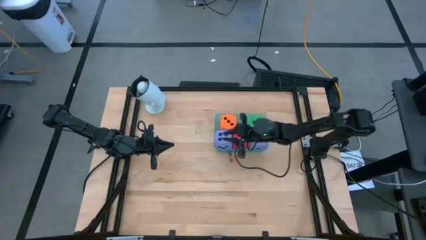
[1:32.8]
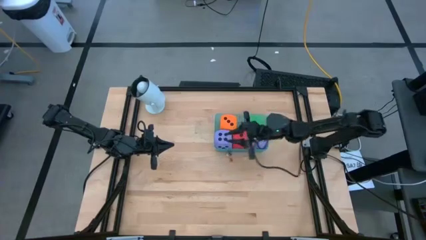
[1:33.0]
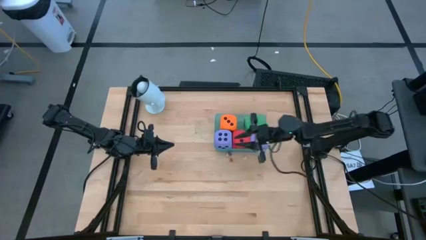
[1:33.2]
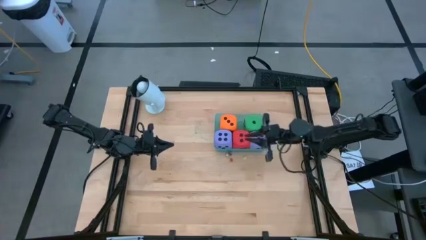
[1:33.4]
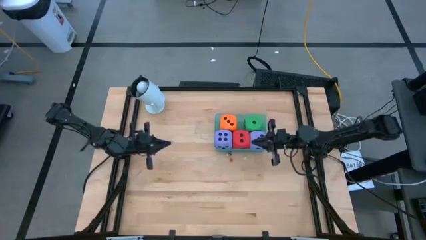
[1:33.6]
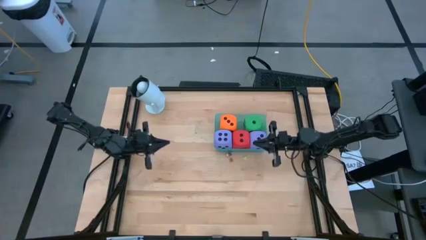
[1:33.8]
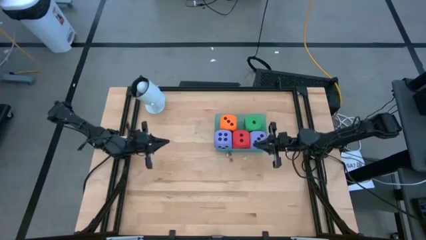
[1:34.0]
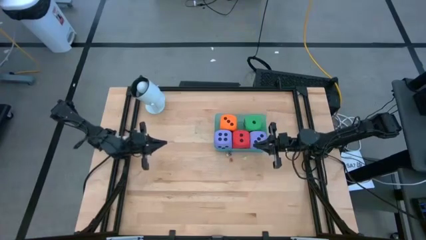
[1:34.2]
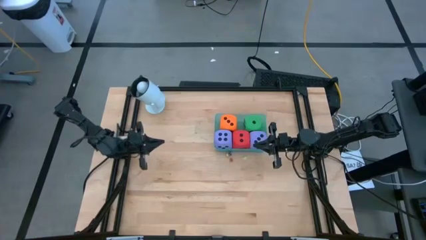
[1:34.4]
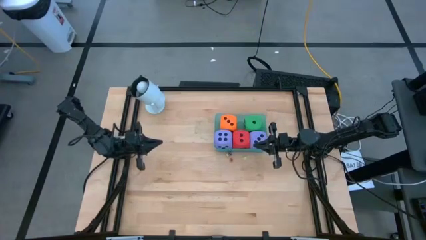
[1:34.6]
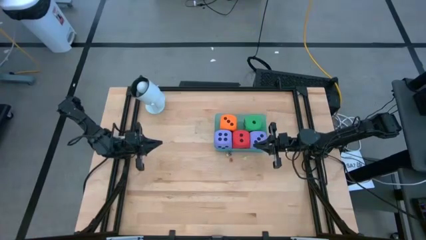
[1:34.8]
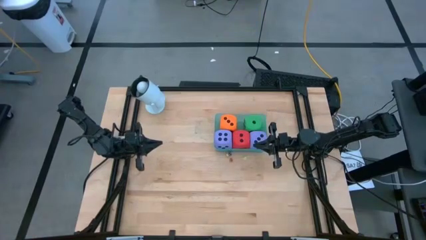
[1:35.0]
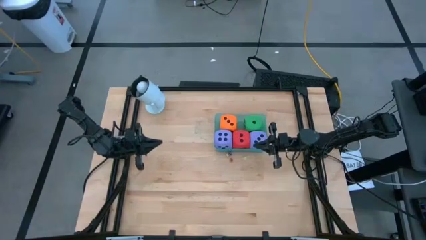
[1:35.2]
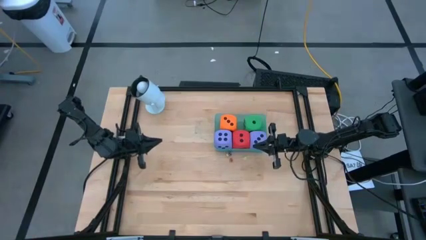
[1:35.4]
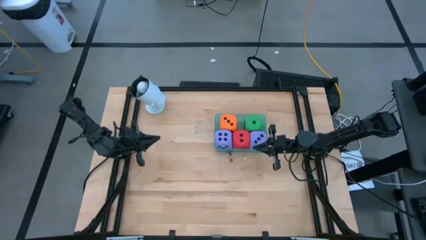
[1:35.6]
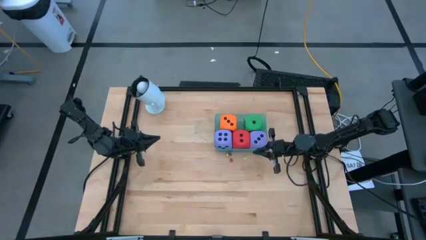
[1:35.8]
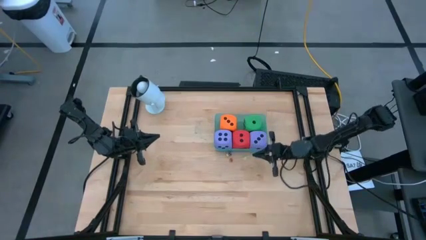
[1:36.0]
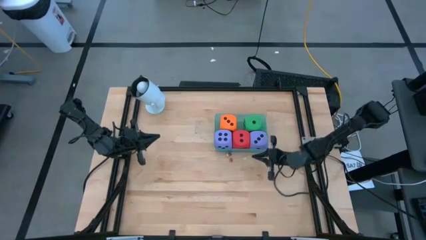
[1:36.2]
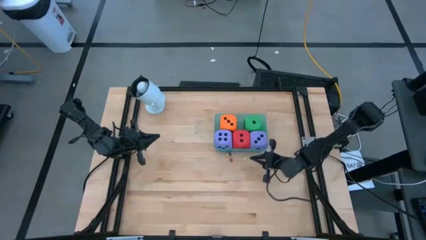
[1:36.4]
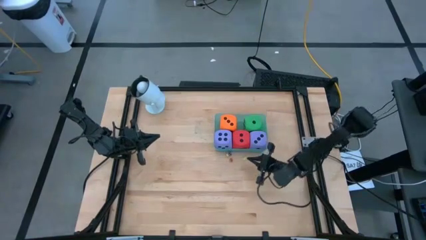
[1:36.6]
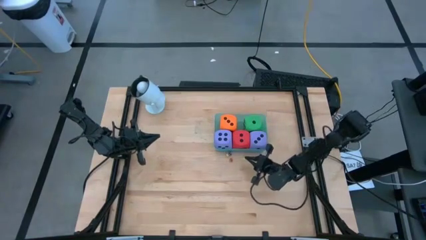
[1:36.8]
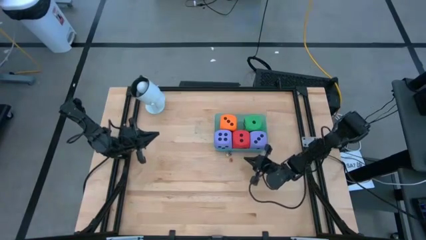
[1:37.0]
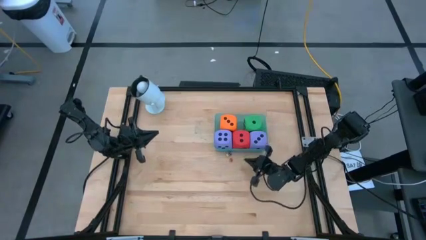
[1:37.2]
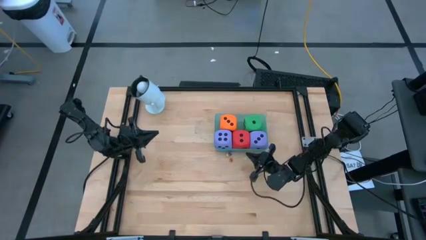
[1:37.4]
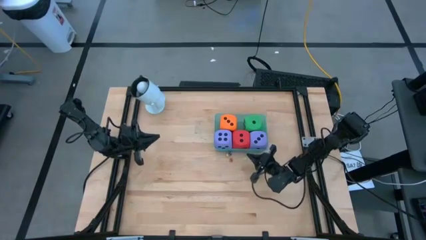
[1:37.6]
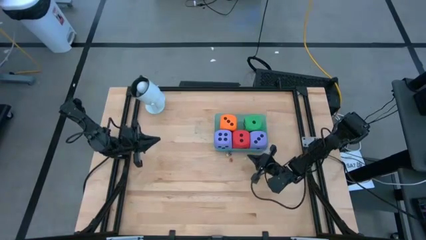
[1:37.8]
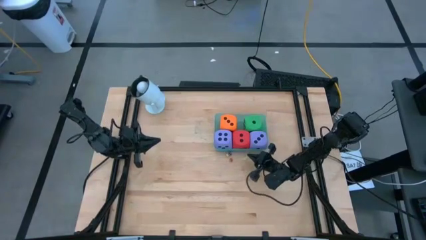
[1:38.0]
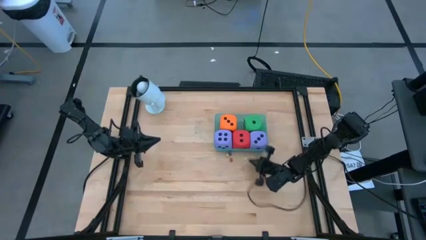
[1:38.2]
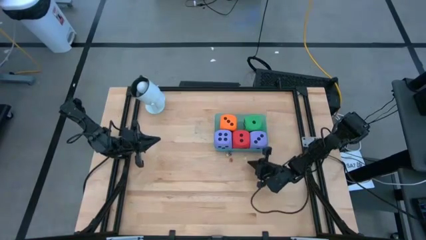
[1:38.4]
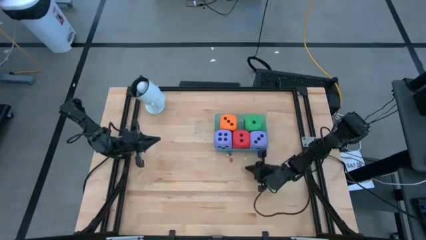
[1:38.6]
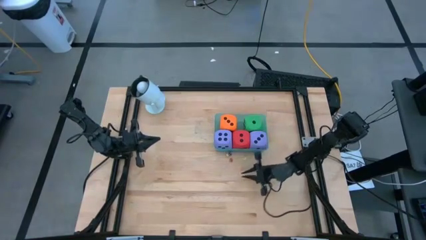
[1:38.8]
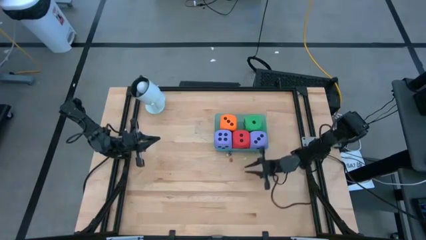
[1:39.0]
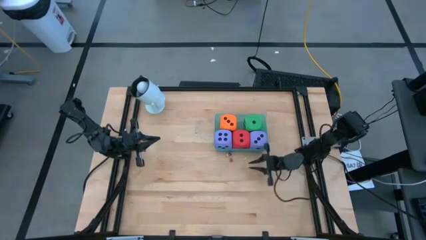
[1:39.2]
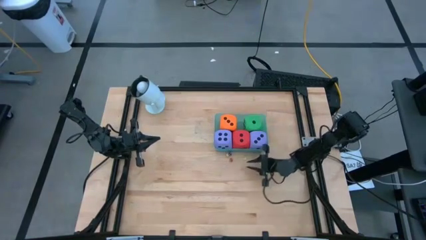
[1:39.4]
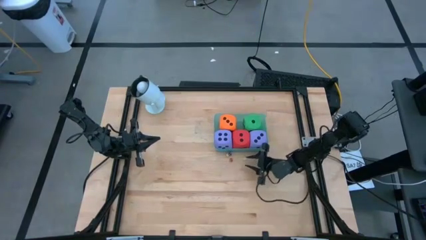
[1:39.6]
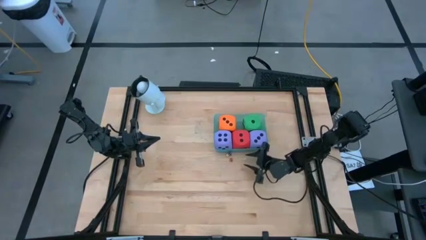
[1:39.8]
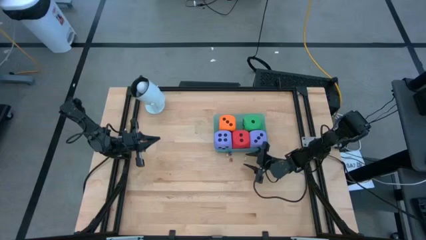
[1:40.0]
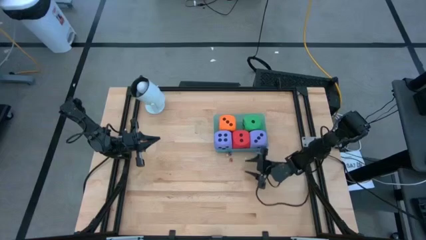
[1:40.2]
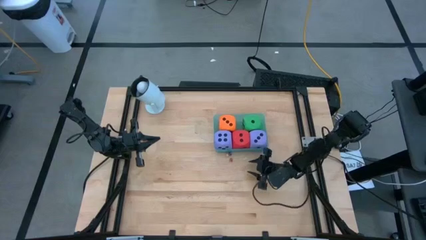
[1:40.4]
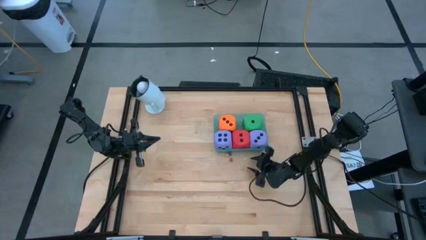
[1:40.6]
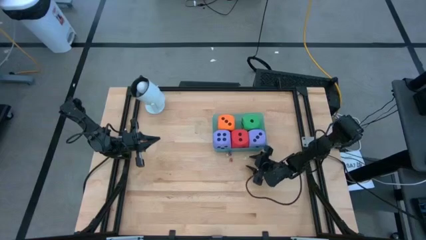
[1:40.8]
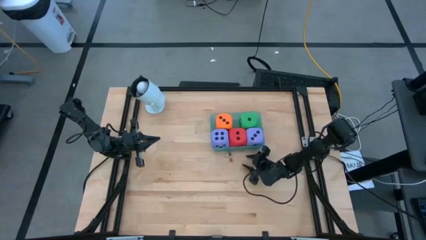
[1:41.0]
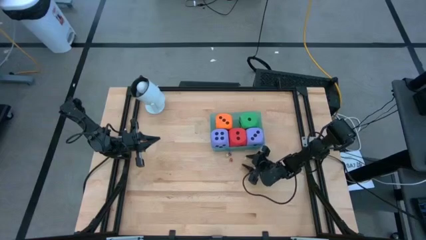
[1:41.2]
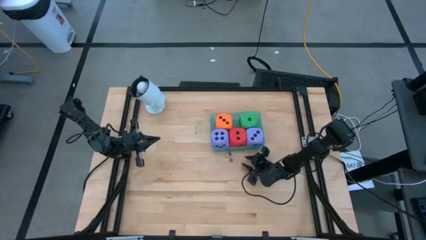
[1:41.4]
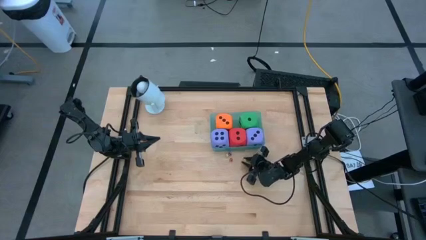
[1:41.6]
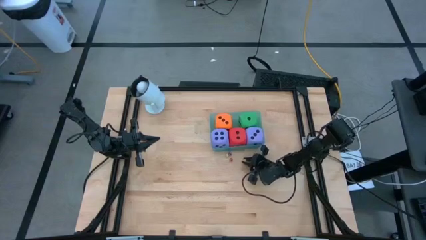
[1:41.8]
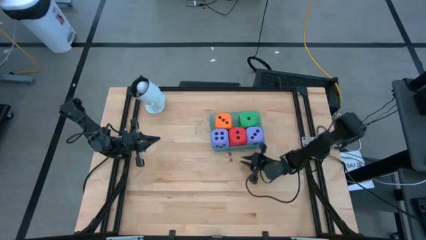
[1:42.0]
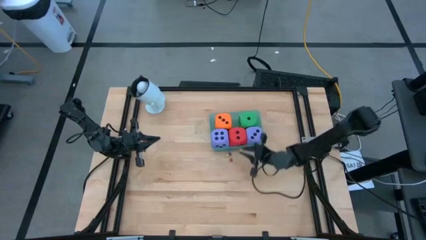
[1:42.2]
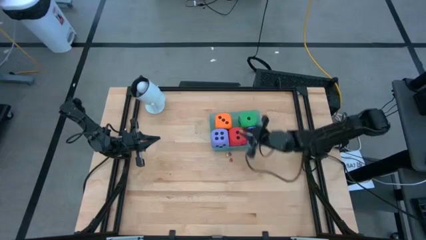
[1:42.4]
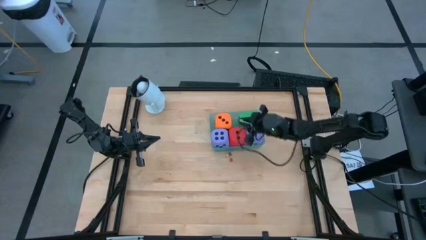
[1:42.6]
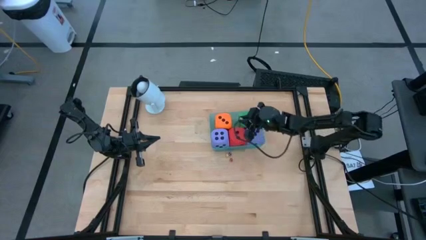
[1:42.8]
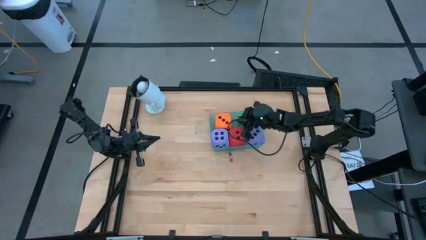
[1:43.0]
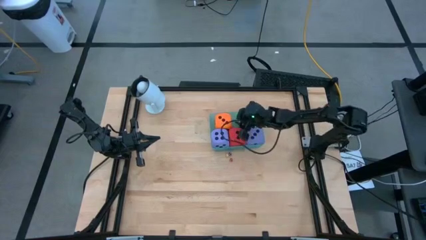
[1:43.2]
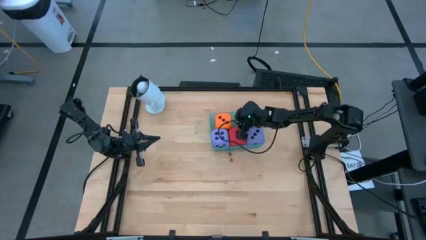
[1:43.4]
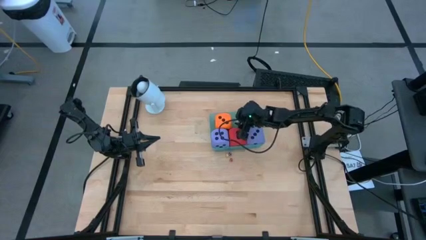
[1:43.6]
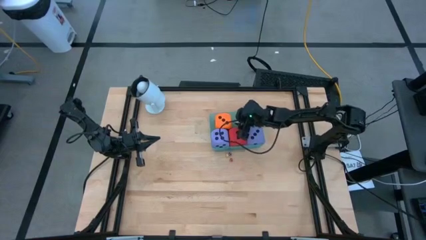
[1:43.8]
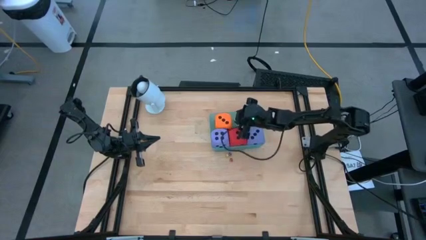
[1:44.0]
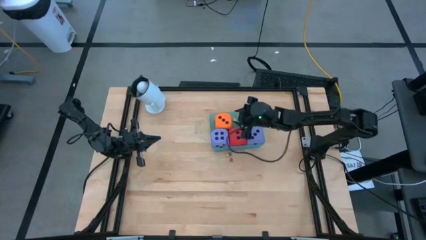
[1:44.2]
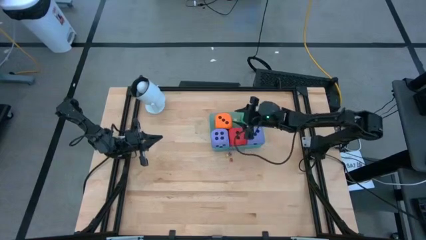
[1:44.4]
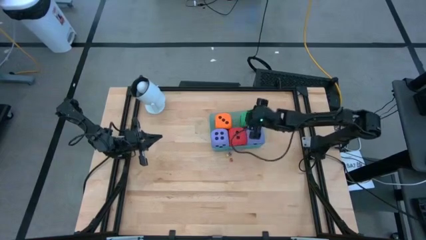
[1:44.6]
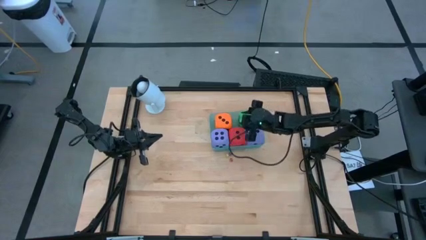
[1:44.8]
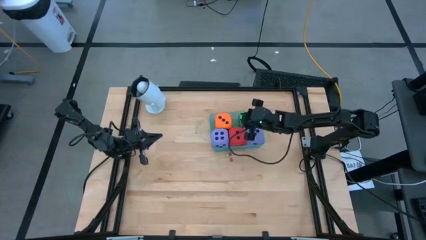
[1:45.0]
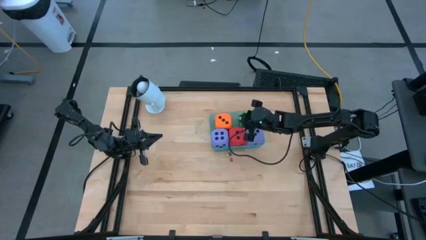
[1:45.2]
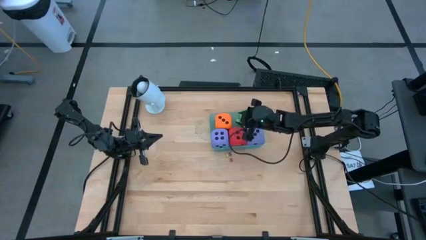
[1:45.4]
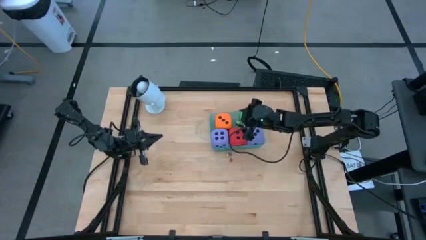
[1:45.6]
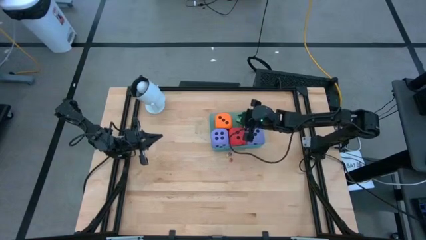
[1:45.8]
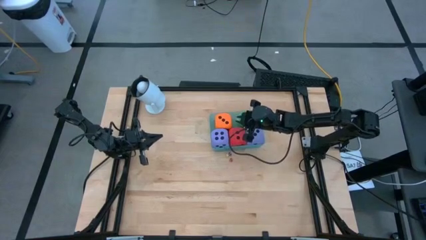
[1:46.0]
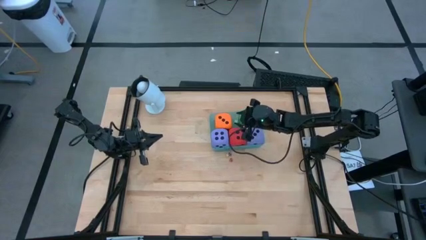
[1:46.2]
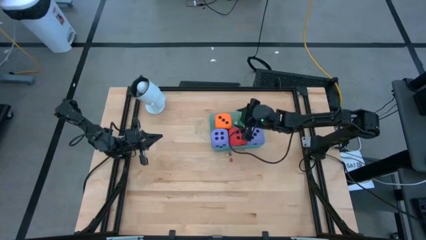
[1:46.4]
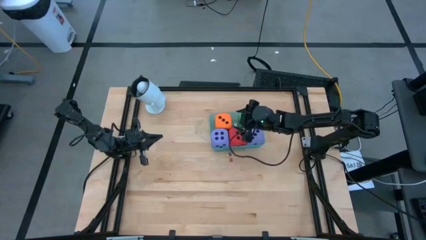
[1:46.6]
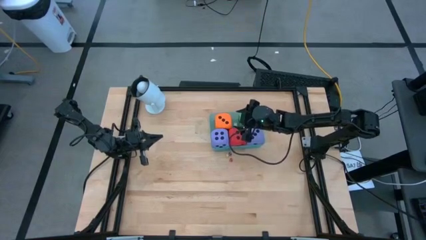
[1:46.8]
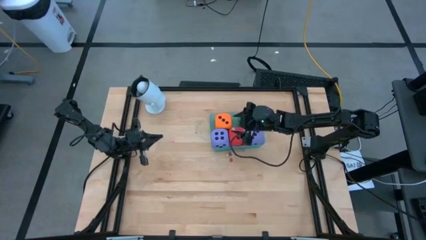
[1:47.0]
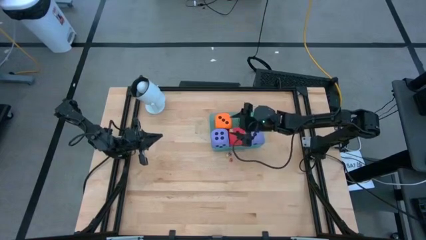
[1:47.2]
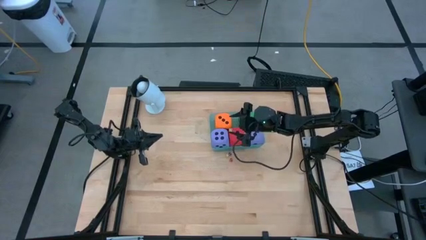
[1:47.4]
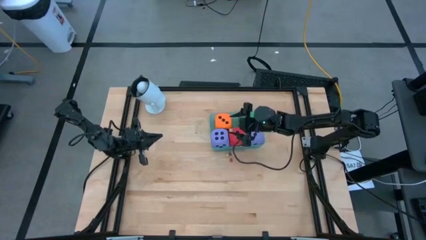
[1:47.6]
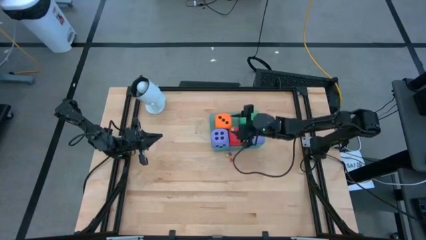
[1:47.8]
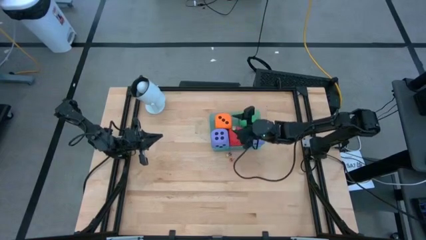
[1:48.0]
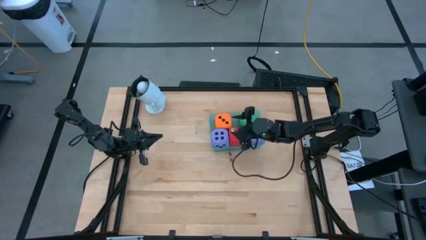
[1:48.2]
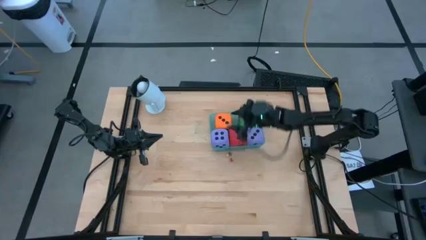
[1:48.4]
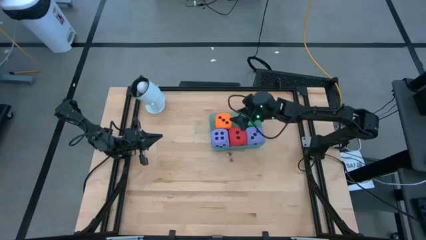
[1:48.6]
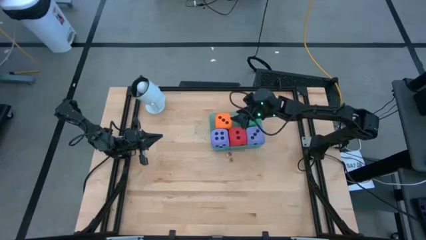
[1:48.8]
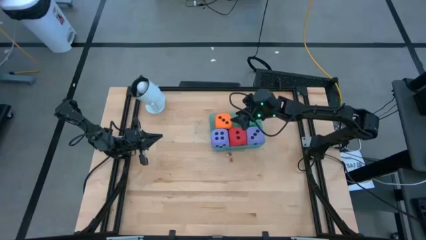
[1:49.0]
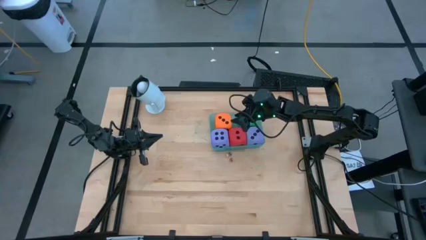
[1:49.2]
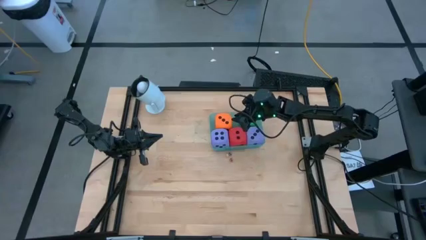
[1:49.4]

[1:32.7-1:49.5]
Task: Pick & Place Dice
Put the small green die into the blue bin

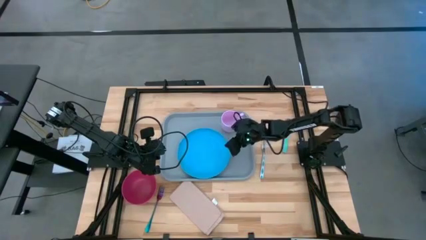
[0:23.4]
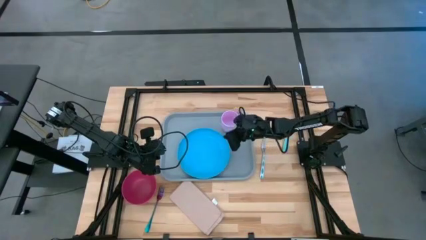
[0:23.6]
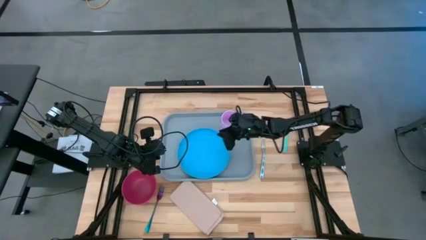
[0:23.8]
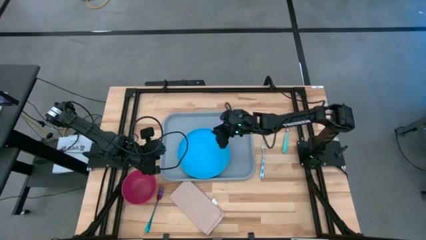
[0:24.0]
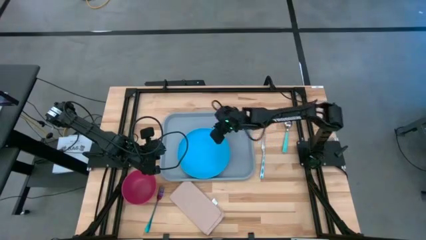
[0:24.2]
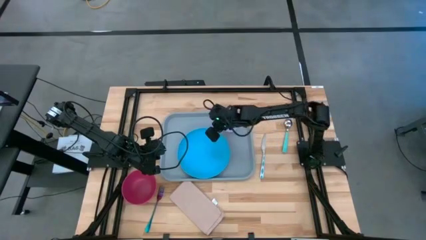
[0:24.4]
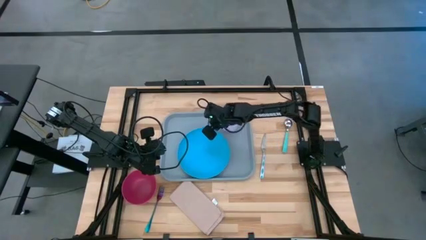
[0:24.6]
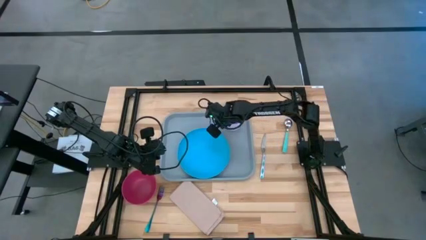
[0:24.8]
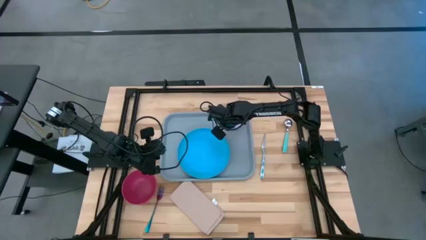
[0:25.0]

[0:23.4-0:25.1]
Task: Set up tray
Adjust the pink mug
